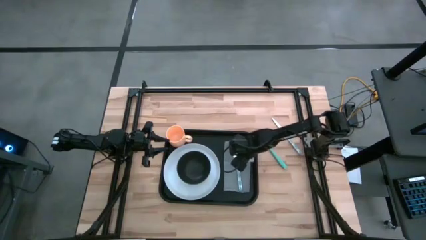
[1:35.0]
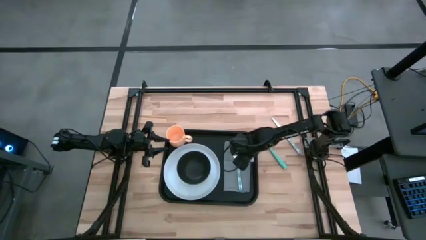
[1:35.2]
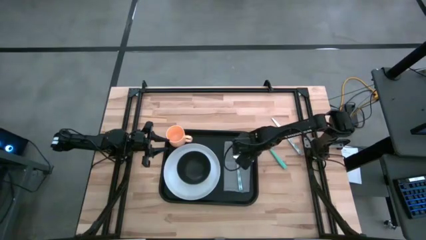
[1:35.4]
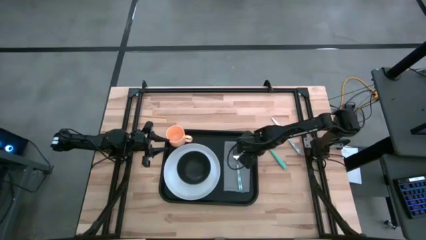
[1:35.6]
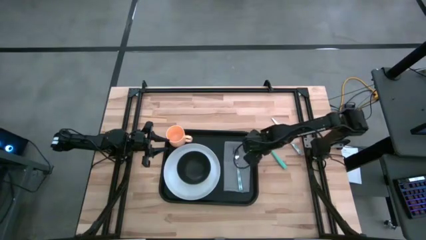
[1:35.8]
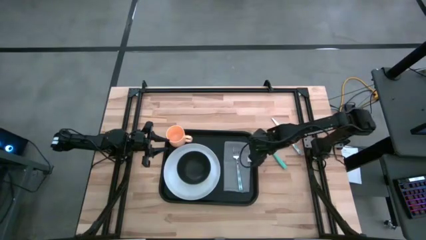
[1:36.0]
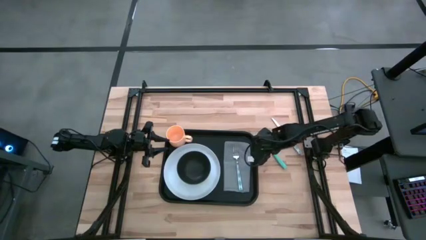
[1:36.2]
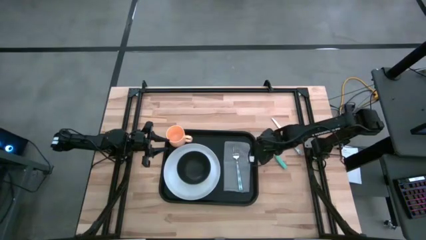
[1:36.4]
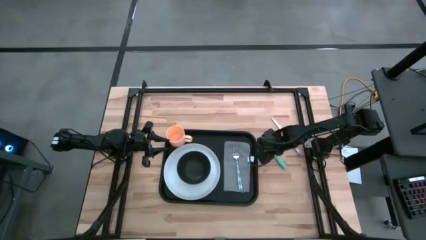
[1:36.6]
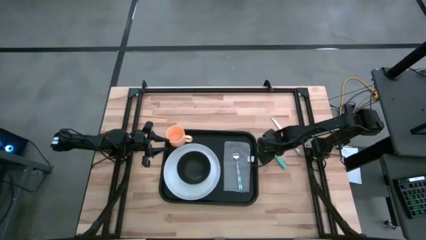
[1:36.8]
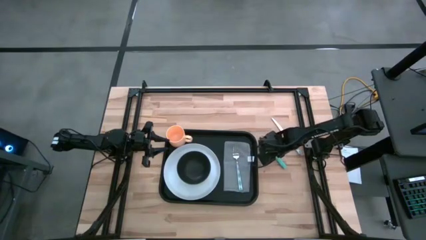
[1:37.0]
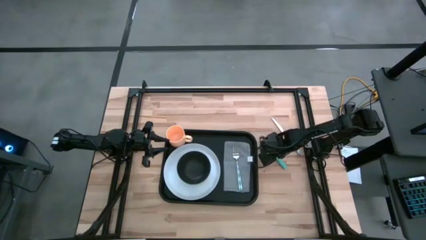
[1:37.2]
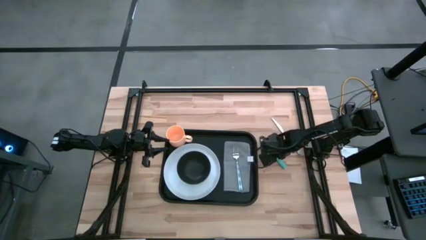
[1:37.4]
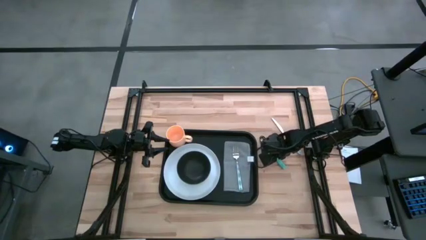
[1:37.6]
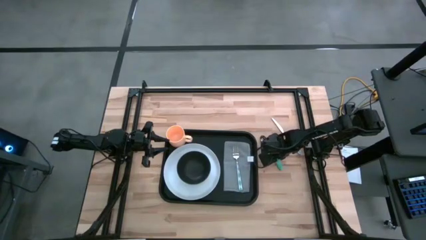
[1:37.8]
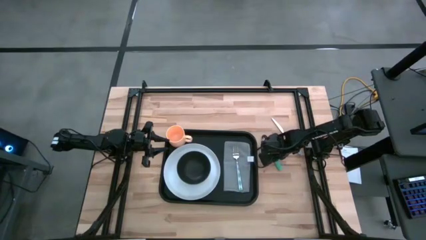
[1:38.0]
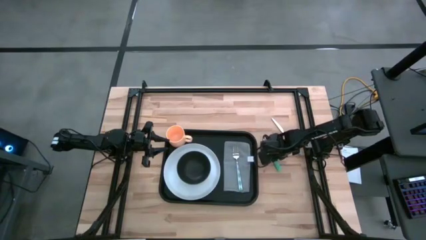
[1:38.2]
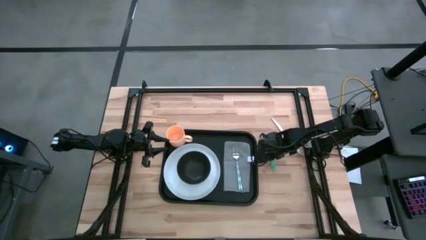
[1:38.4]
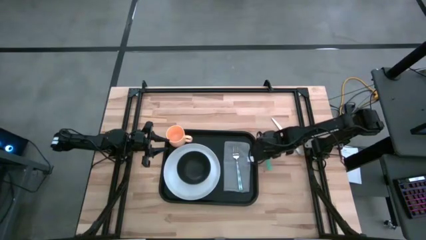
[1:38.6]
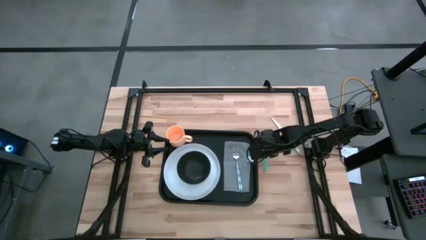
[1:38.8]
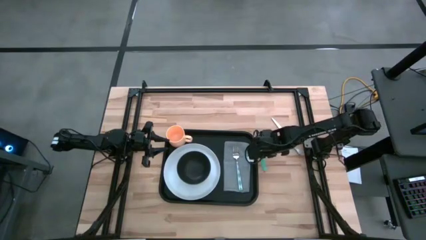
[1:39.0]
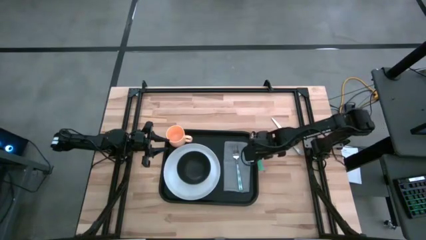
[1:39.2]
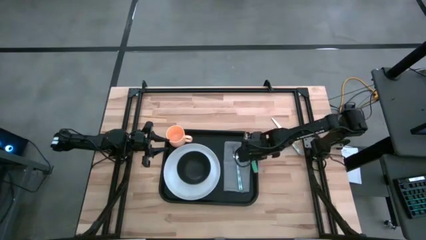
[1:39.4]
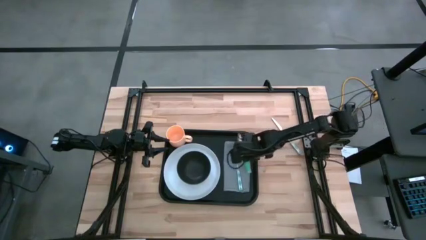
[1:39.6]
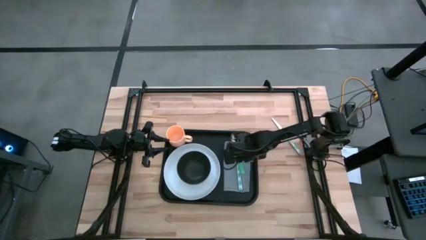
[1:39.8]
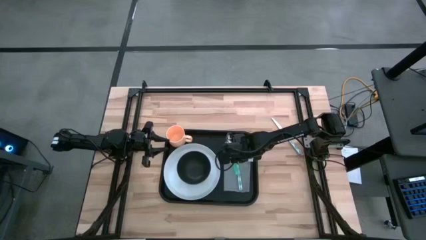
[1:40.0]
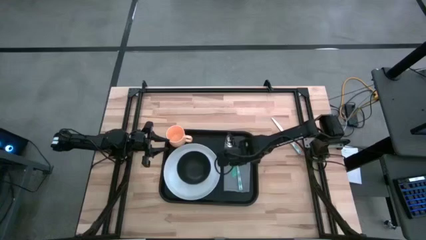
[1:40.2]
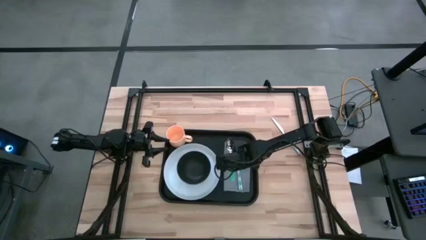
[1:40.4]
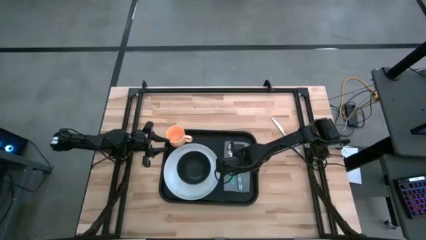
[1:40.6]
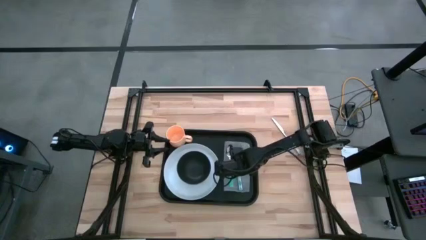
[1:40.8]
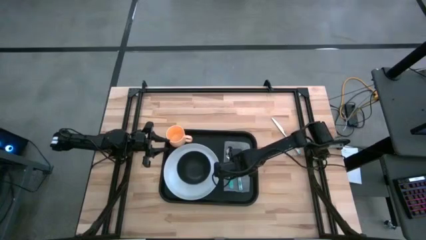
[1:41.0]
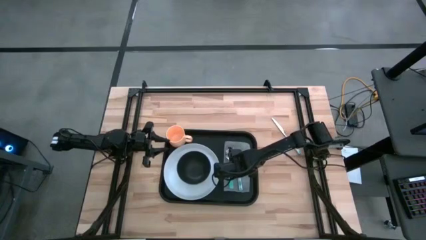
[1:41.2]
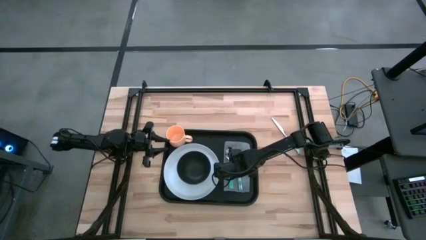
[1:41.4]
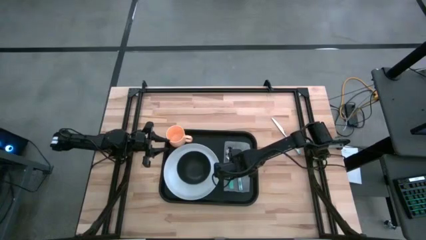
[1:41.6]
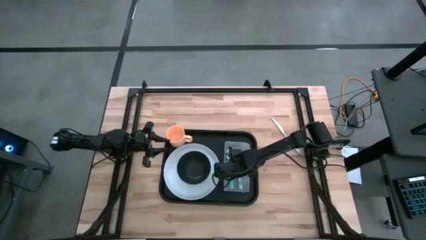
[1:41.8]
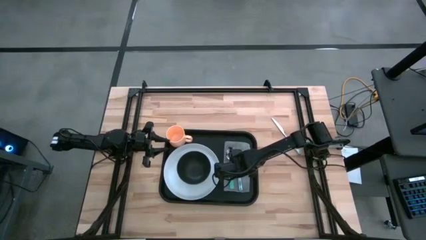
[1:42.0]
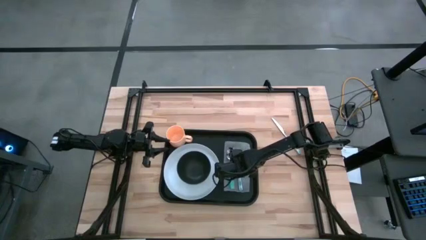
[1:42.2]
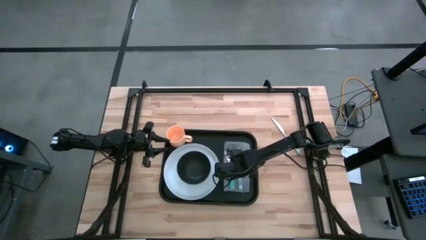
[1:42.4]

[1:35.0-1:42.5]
Task: Set up tray
Put the blue spoon on the grey napkin beside the blue fork

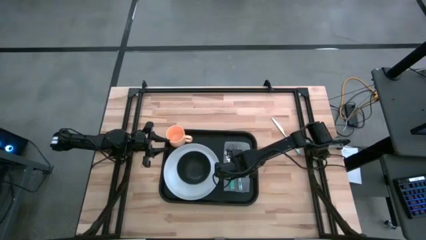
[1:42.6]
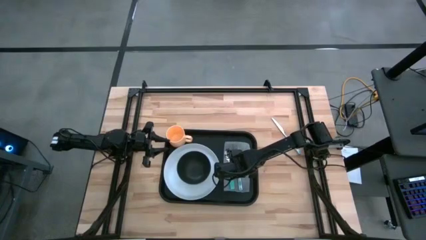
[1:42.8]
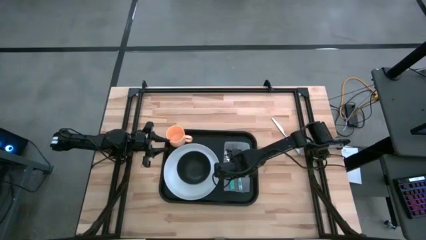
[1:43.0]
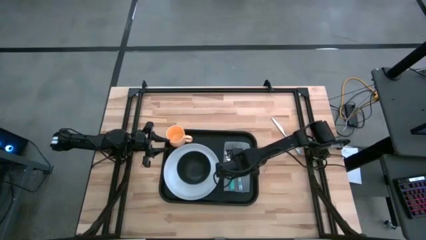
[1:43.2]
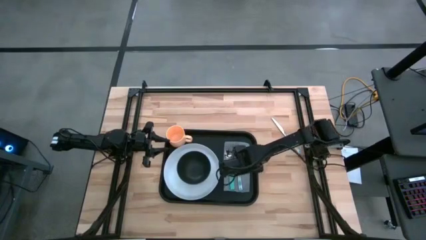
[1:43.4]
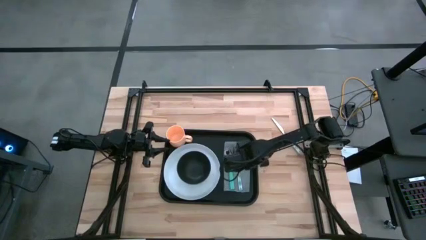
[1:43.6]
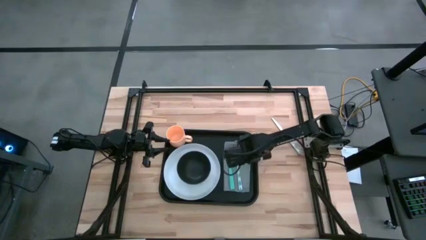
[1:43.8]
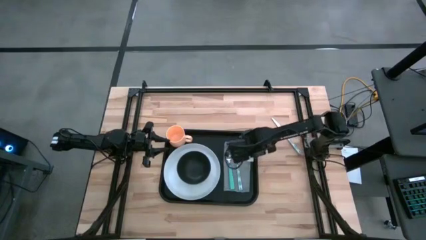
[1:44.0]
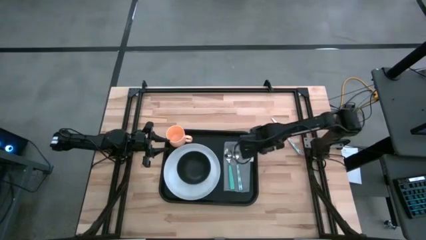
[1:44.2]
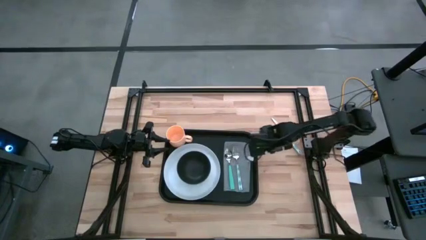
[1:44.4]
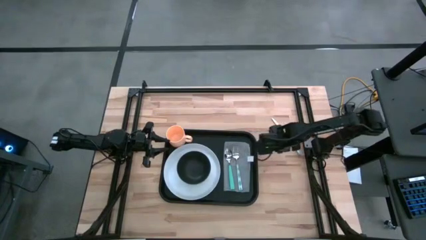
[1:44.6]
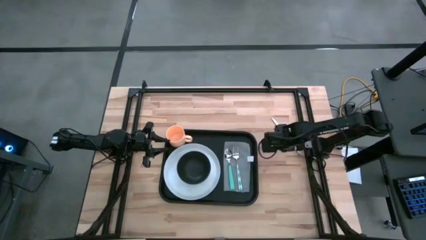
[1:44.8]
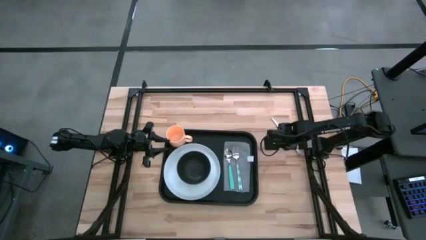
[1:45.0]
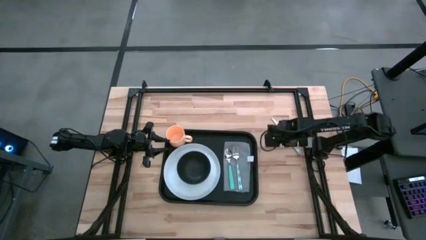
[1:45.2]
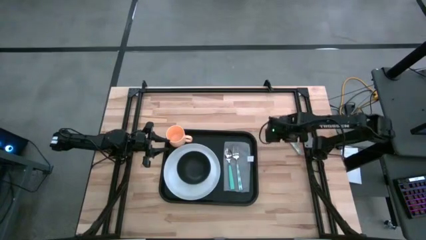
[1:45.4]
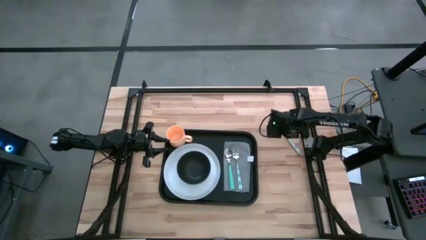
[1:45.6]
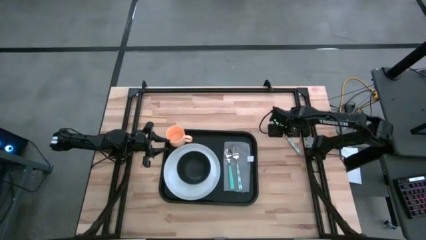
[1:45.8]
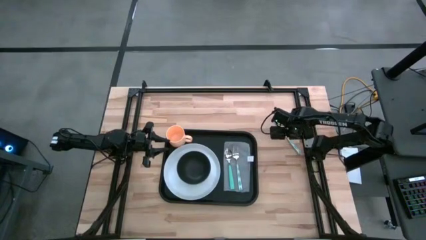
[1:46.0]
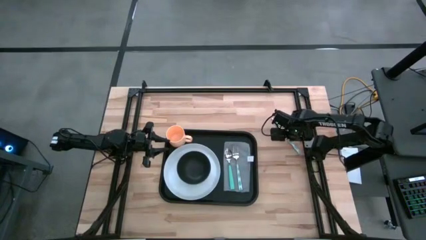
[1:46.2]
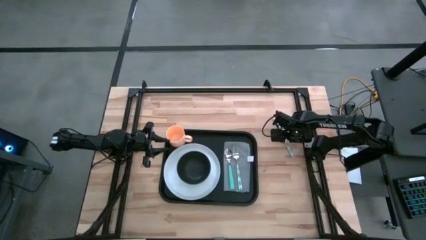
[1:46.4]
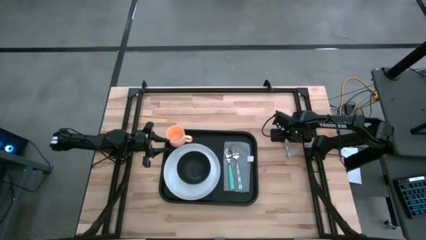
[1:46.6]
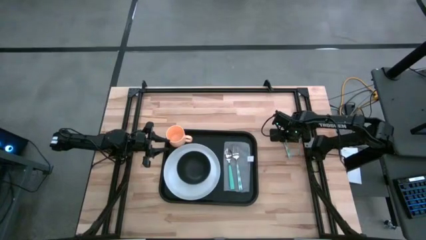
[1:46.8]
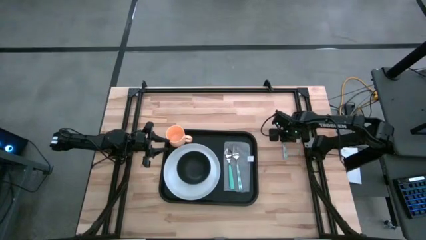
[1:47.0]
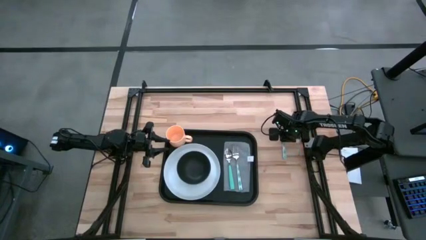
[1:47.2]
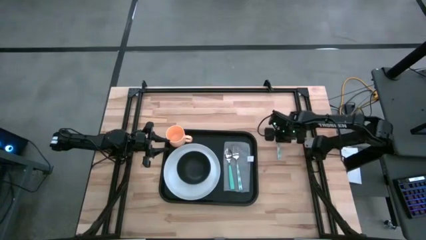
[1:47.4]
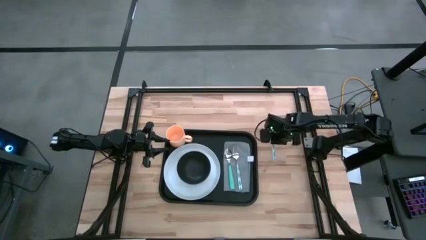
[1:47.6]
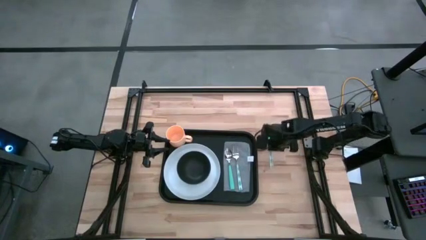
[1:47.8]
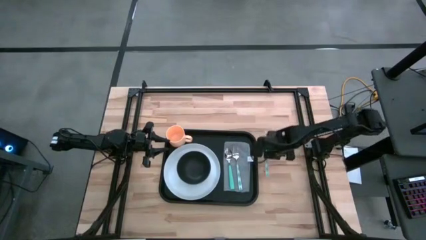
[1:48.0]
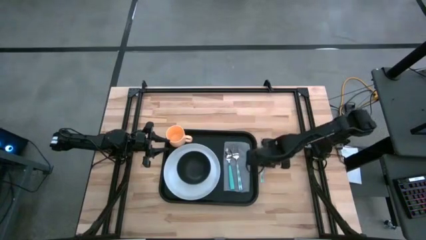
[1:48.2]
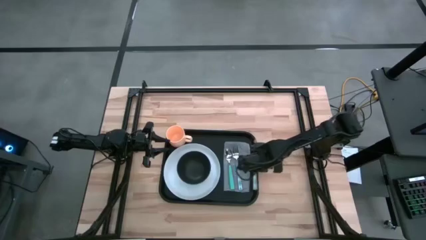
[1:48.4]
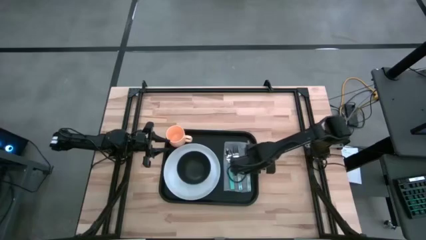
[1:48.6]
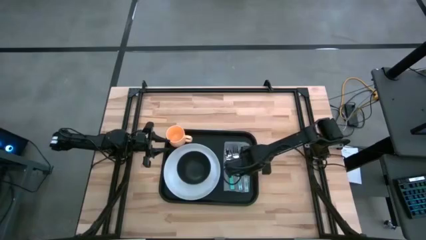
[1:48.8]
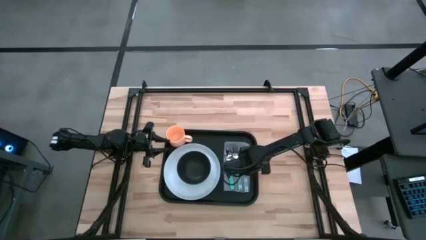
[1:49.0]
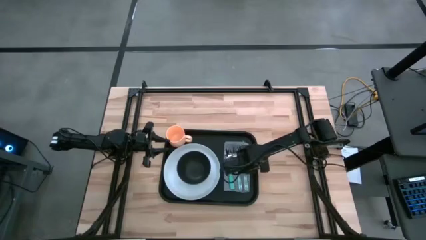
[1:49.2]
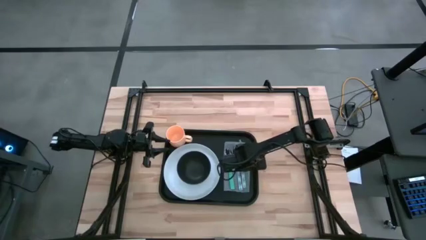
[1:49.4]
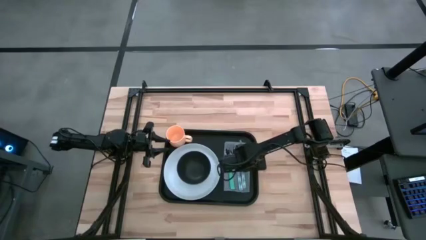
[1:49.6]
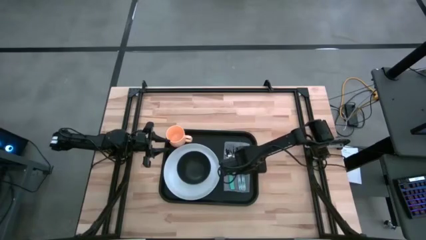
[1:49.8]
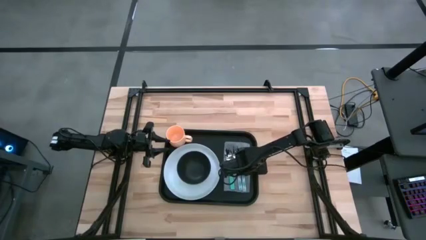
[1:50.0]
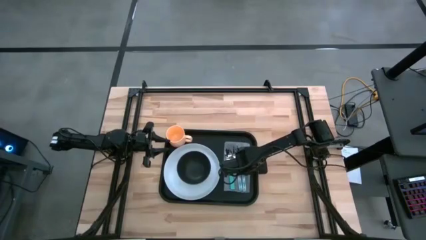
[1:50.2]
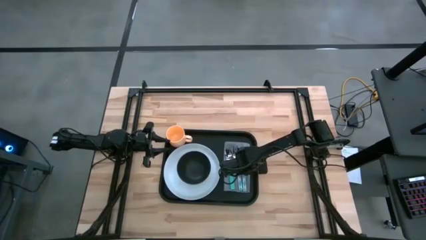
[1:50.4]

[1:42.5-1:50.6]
Put the blue knife on the grey napkin beside the blue fork
